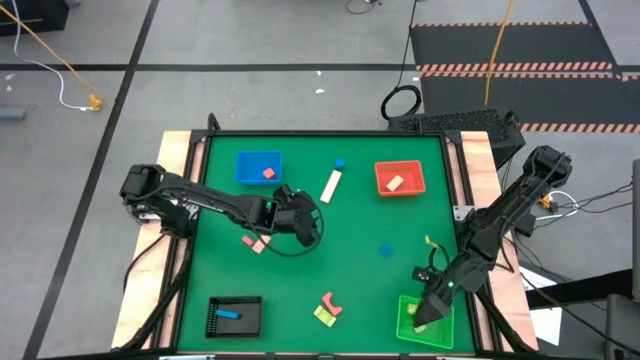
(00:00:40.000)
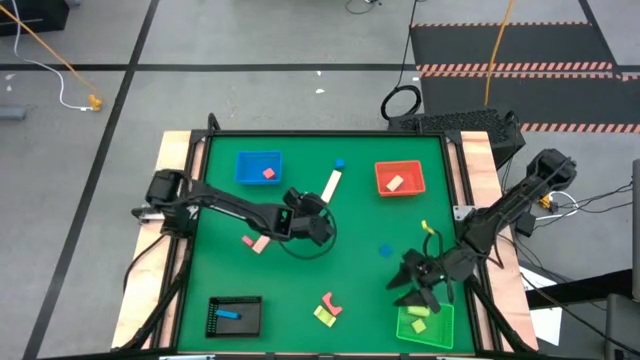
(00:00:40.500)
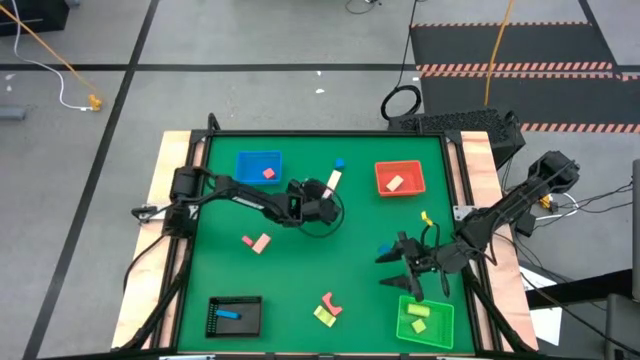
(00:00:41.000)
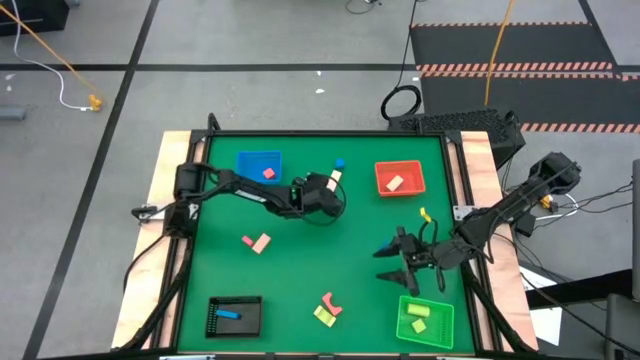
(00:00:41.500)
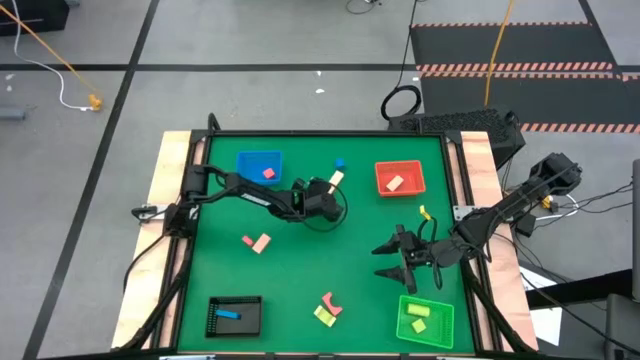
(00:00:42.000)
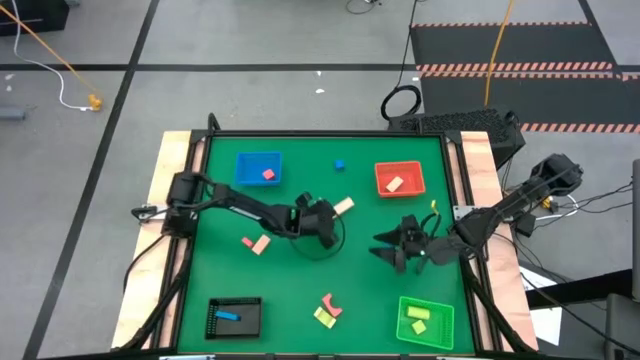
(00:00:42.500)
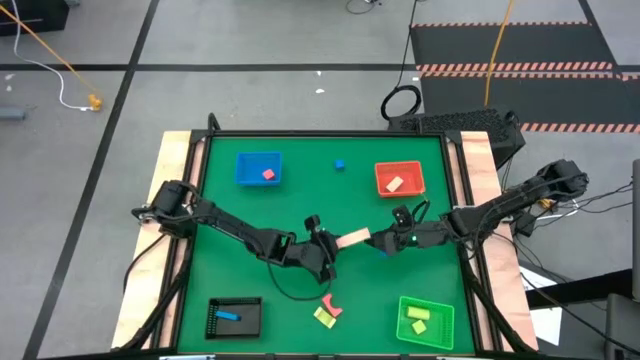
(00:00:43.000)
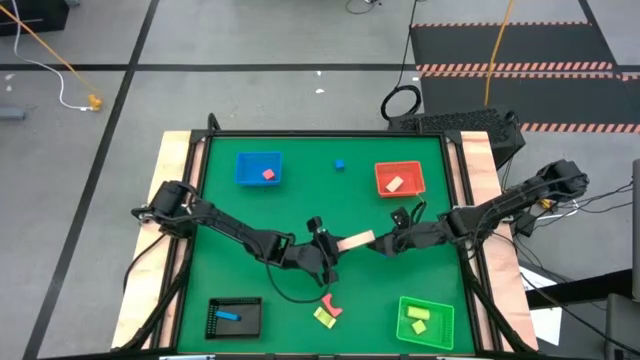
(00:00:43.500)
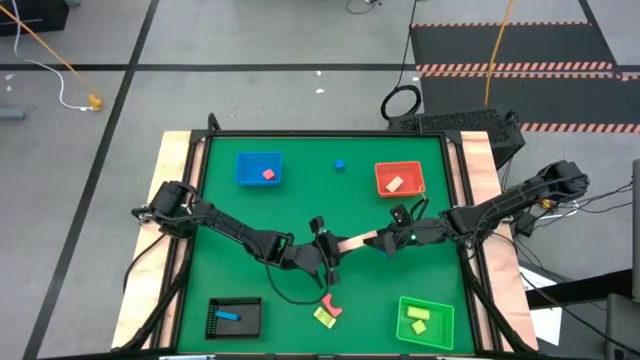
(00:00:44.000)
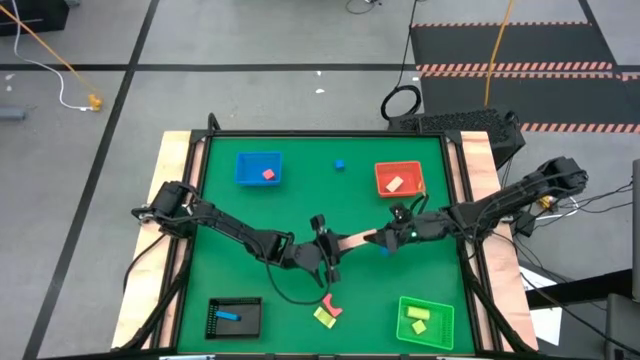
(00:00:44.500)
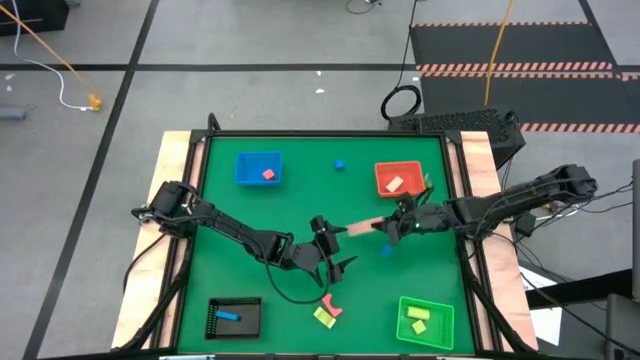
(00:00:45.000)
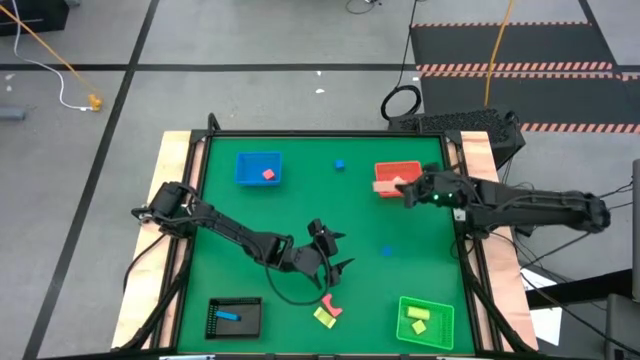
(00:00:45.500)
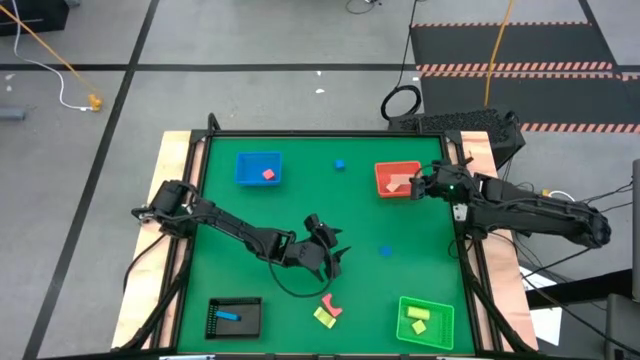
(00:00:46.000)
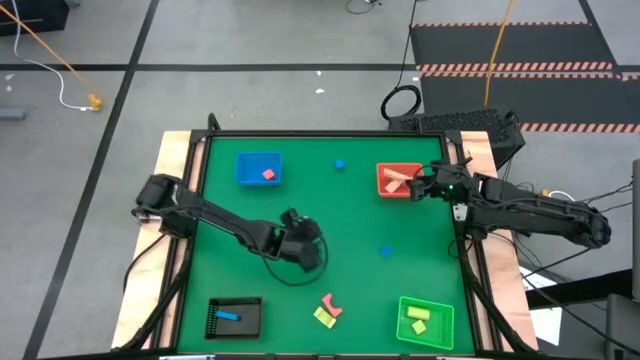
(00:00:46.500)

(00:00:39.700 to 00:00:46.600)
Task: Sort & place blocks by color
Put the top brown block in the orange basket

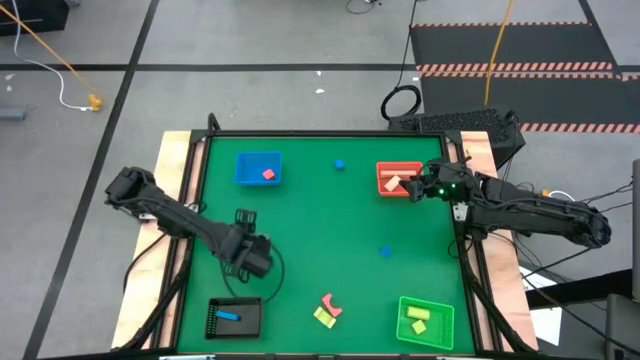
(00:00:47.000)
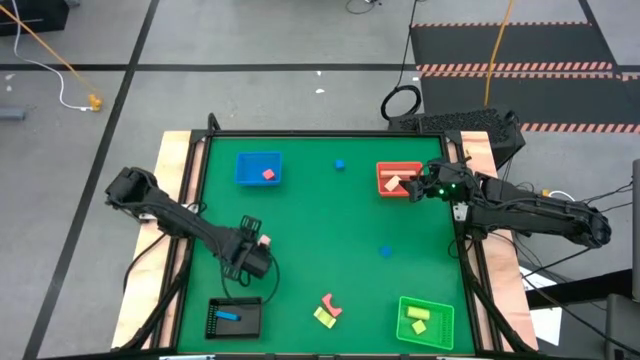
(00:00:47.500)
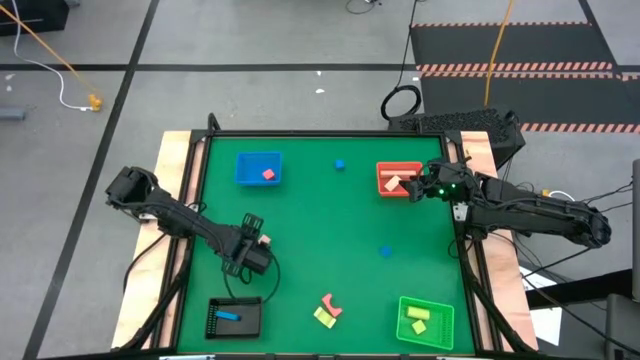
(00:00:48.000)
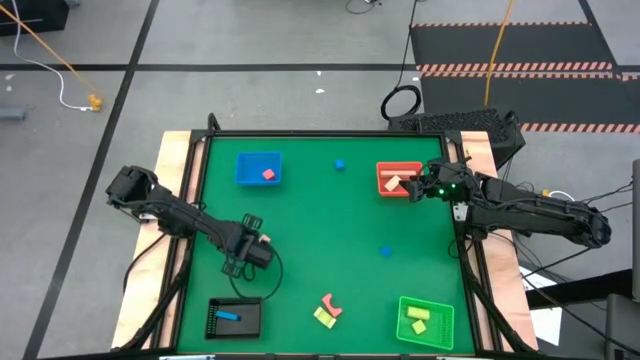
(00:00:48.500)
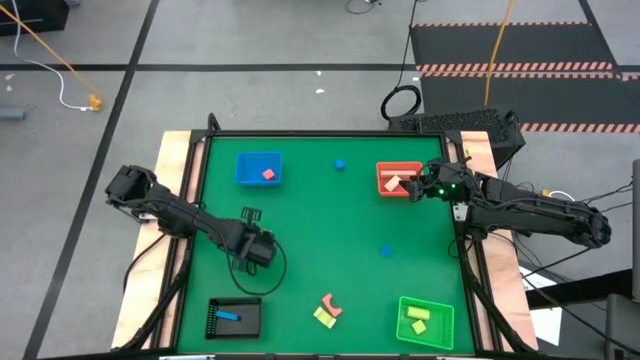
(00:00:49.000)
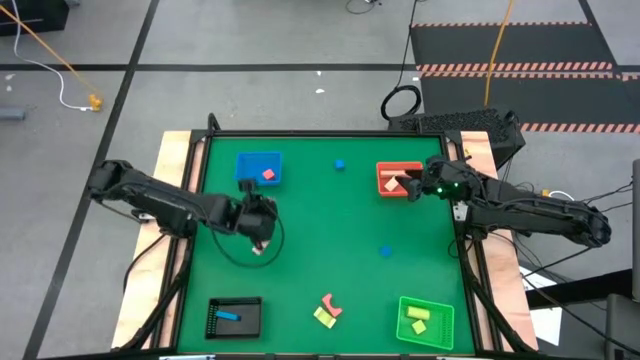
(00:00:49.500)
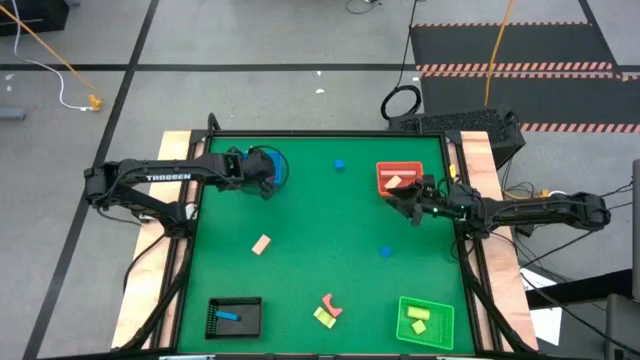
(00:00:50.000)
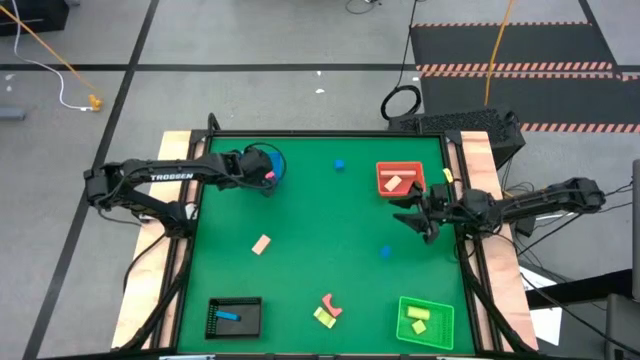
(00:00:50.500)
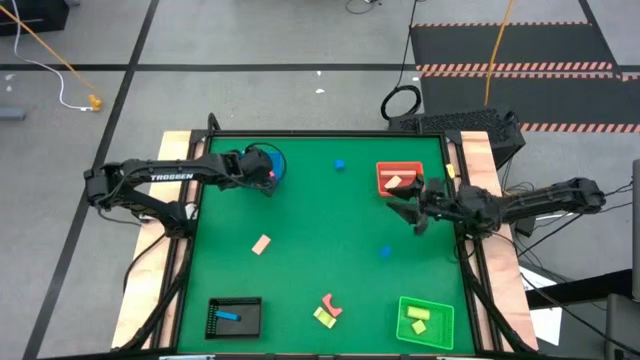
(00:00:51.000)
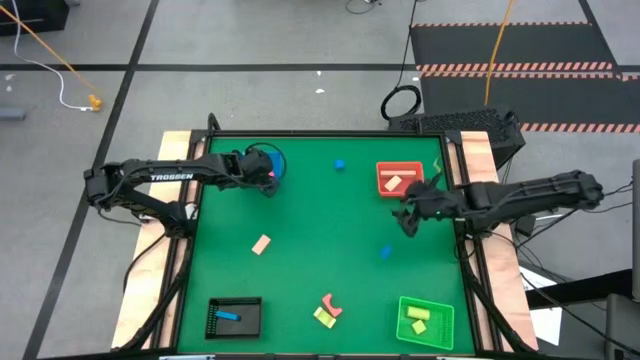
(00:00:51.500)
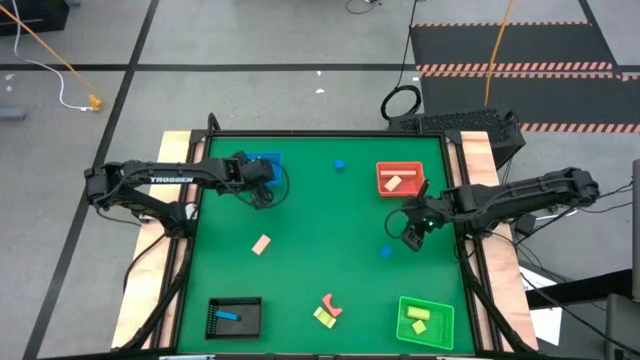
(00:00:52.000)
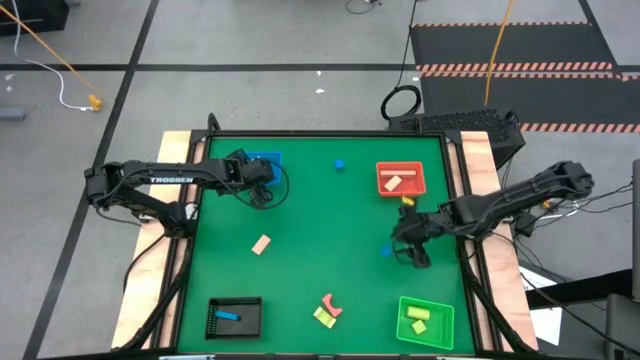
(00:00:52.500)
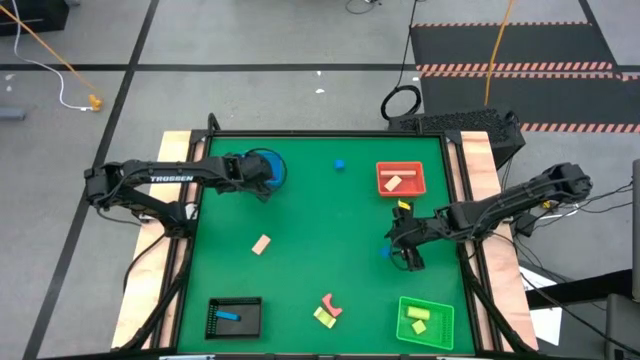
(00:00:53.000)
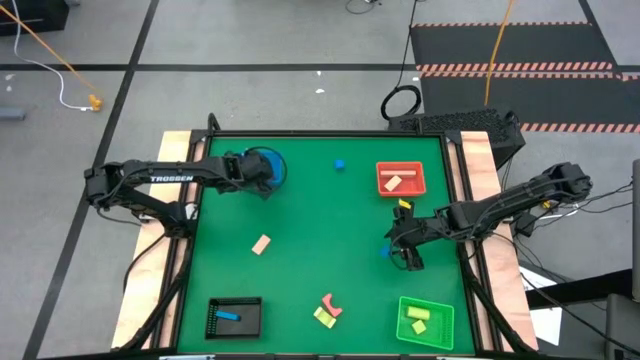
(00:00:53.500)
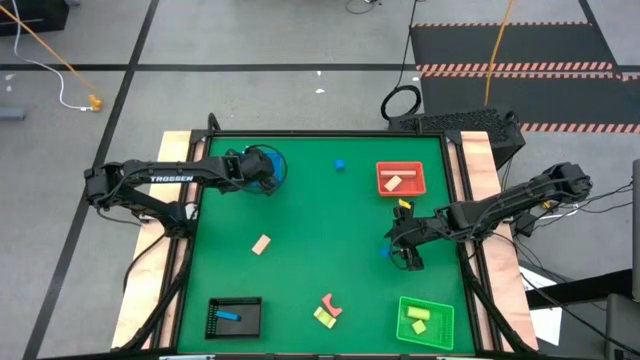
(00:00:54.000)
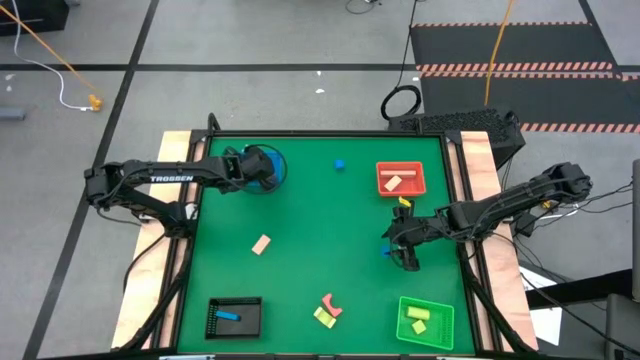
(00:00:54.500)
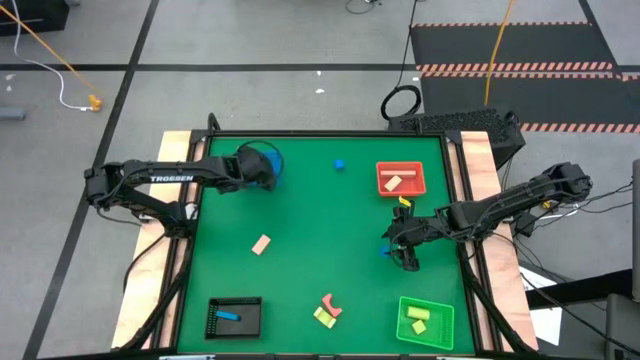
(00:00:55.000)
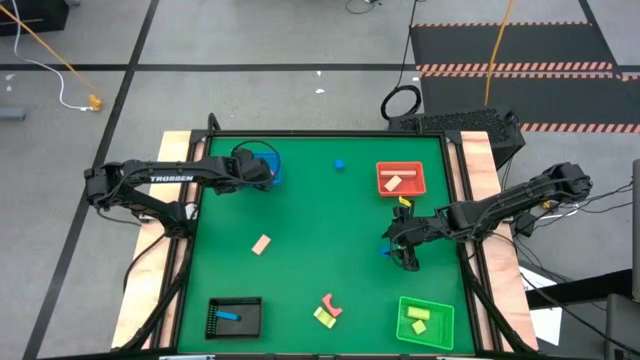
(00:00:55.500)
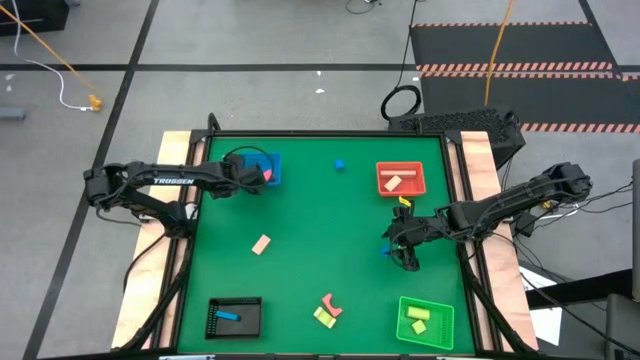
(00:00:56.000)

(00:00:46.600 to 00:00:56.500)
Put the top orange block in the blue basket

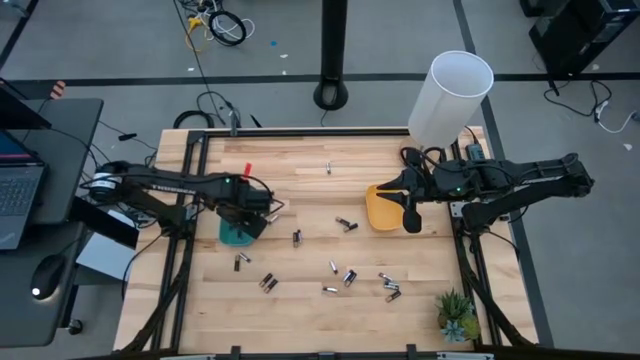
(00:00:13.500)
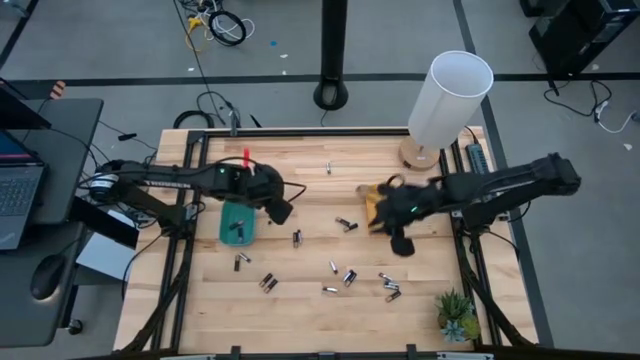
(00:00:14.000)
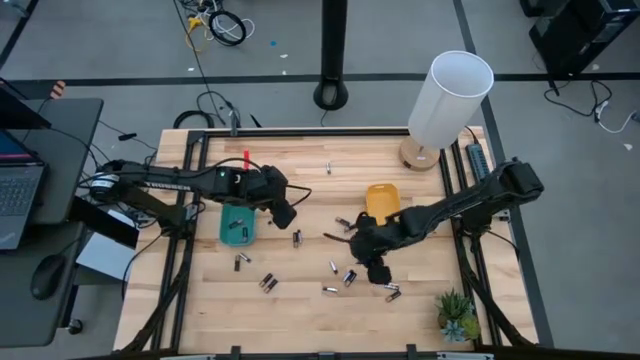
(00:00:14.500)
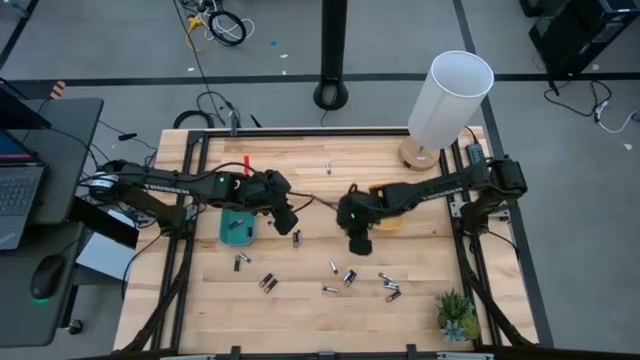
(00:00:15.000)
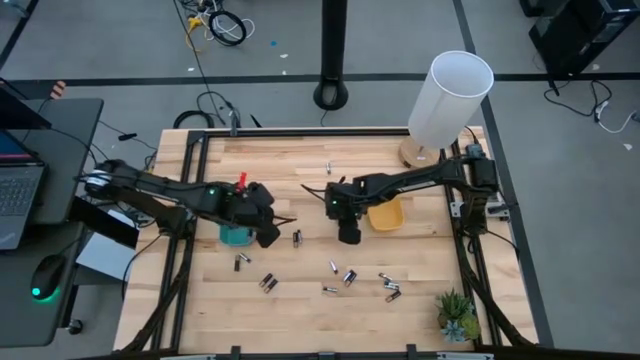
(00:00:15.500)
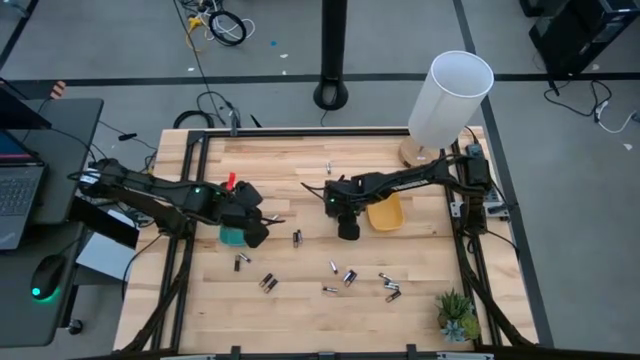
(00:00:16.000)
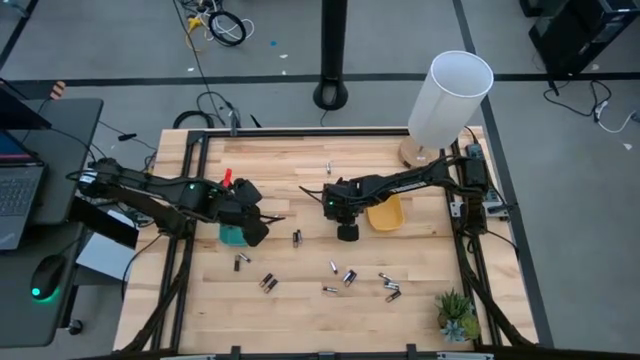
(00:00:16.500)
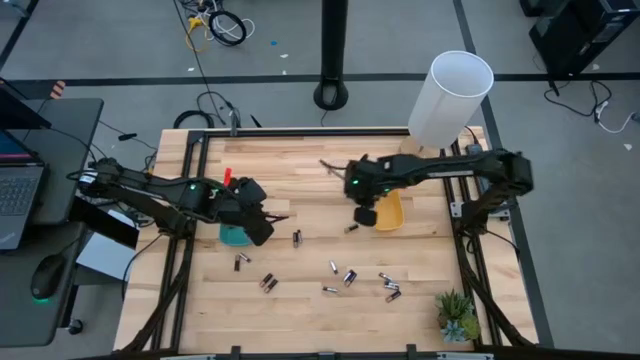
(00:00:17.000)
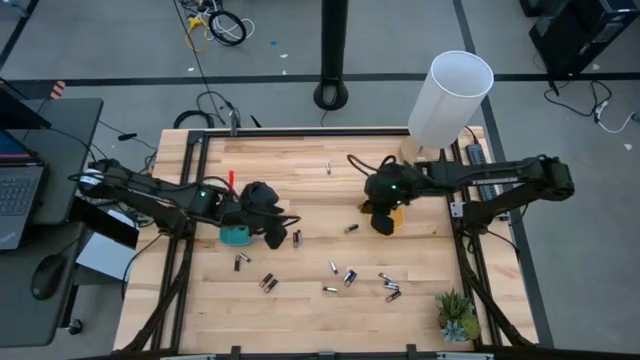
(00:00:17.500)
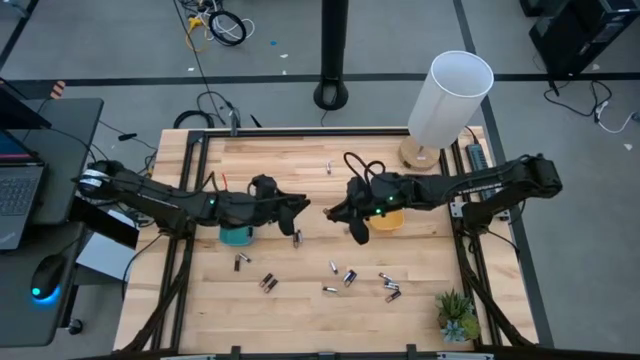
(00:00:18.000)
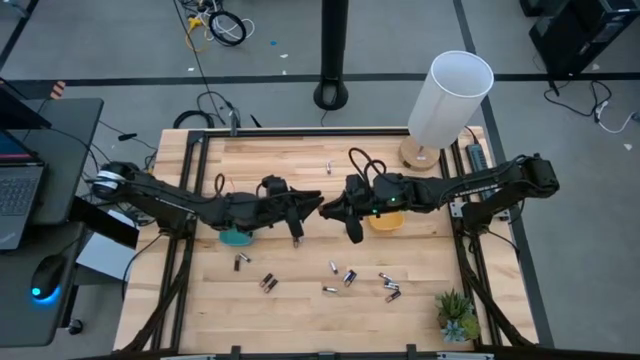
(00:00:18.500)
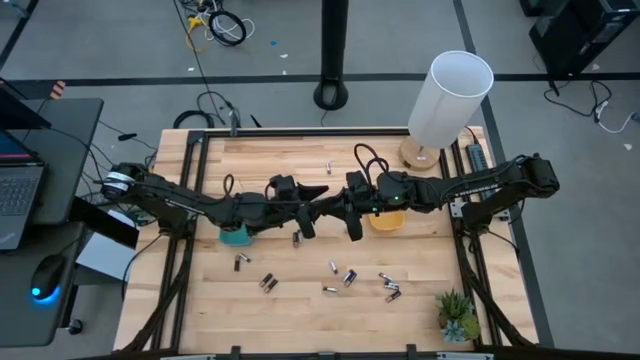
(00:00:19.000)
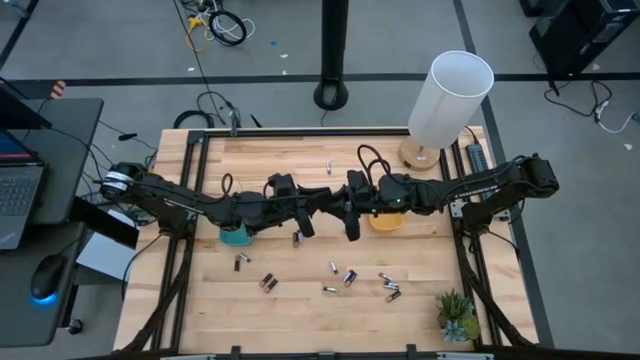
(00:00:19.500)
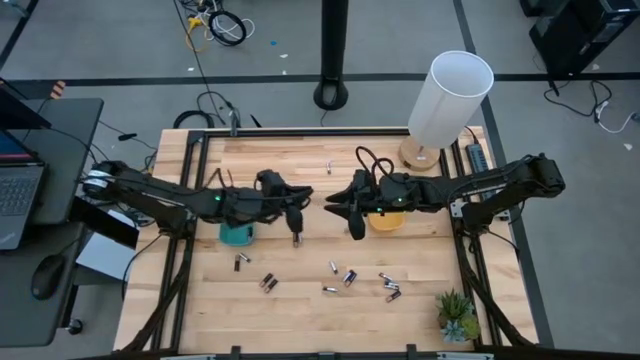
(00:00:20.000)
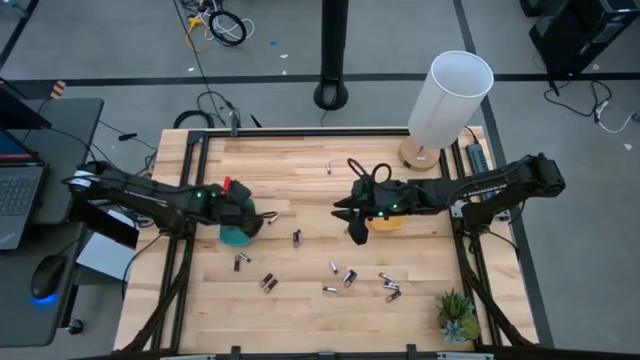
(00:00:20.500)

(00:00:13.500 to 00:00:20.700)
Task: Sort batteries
Put the black battery into the green bin
